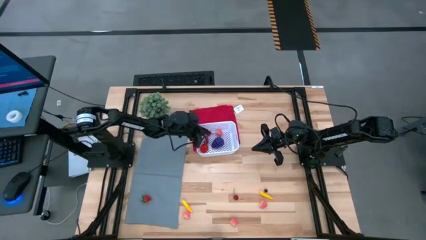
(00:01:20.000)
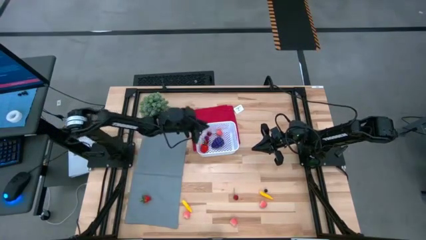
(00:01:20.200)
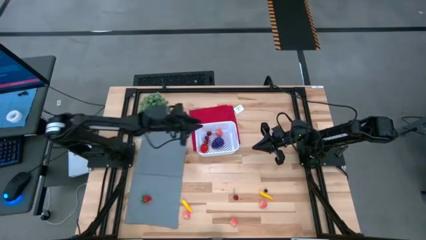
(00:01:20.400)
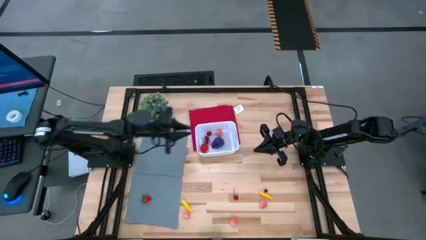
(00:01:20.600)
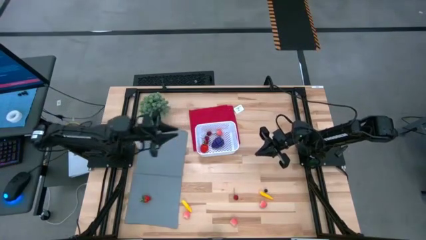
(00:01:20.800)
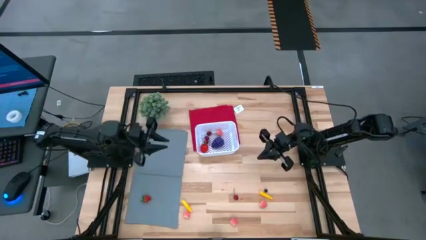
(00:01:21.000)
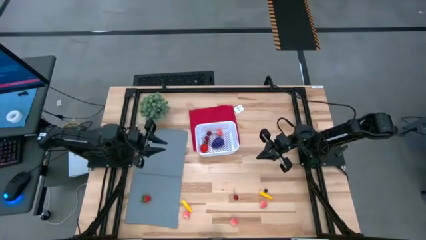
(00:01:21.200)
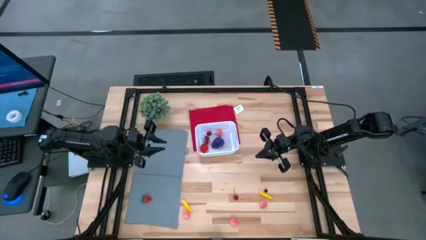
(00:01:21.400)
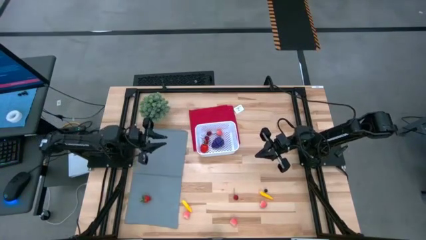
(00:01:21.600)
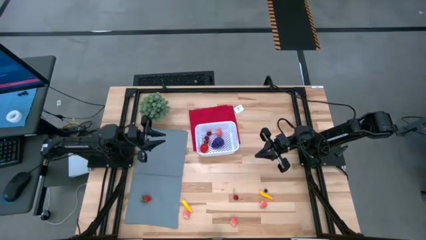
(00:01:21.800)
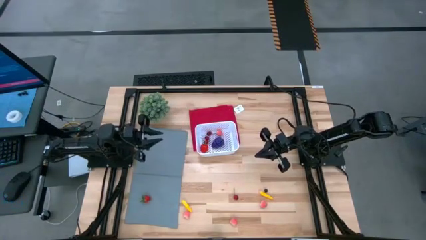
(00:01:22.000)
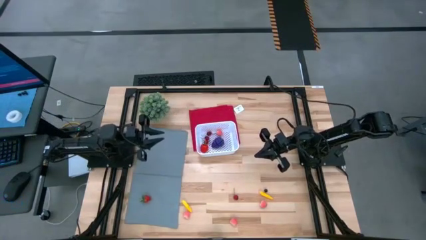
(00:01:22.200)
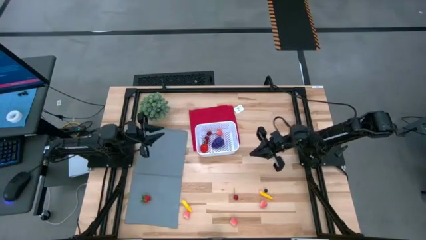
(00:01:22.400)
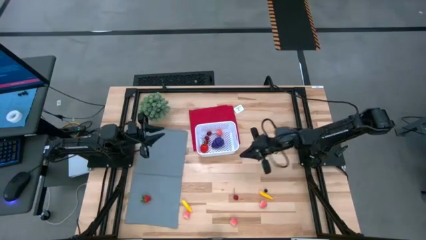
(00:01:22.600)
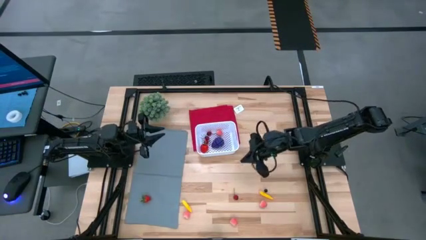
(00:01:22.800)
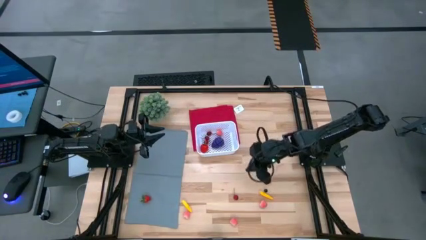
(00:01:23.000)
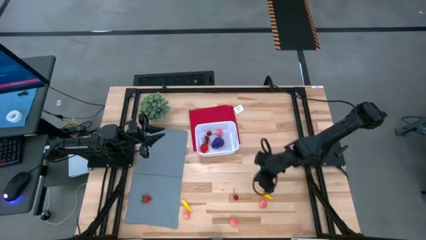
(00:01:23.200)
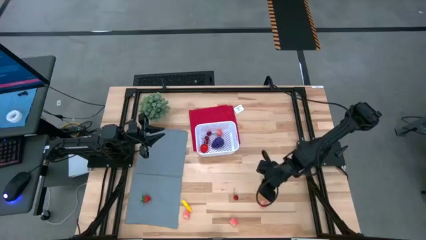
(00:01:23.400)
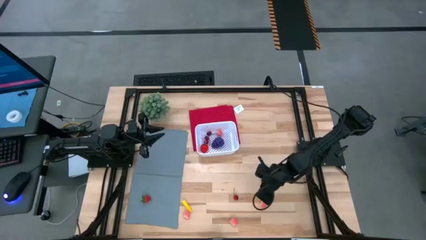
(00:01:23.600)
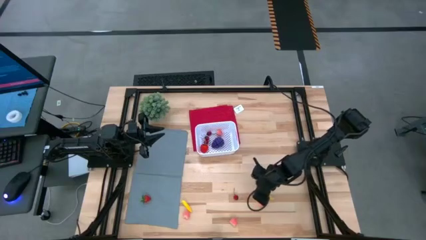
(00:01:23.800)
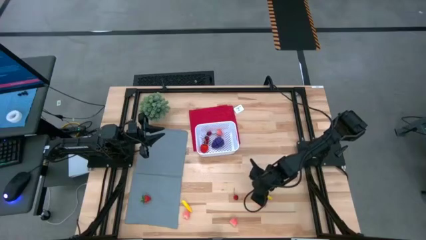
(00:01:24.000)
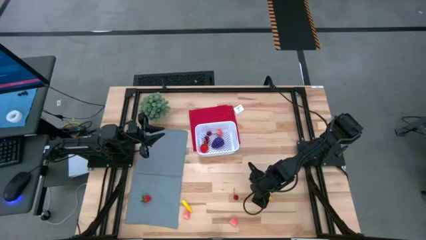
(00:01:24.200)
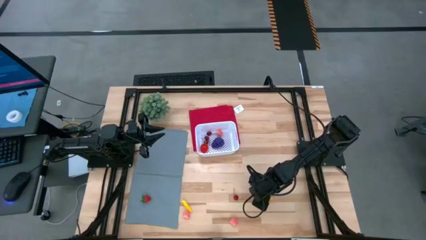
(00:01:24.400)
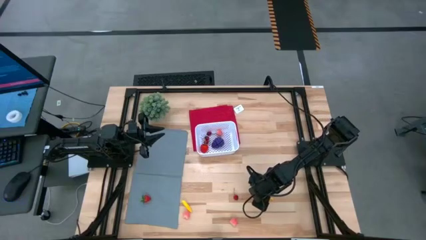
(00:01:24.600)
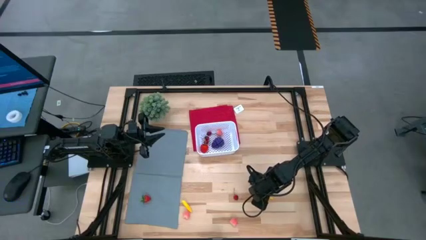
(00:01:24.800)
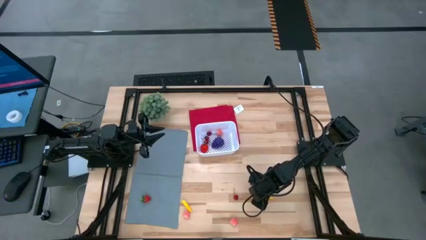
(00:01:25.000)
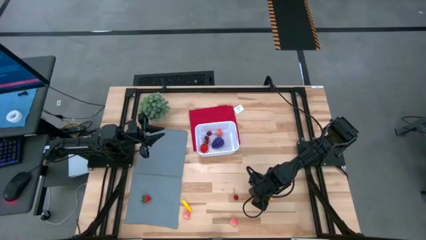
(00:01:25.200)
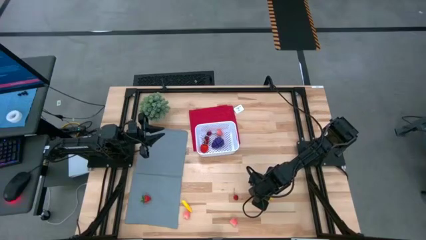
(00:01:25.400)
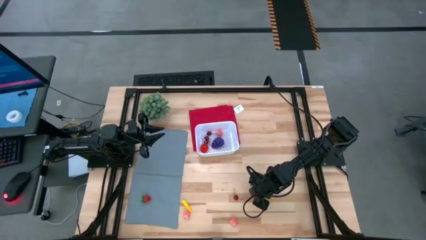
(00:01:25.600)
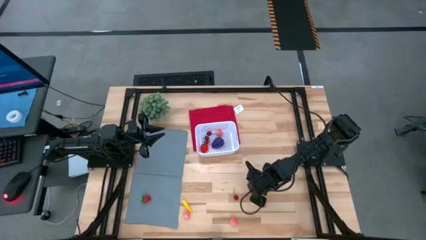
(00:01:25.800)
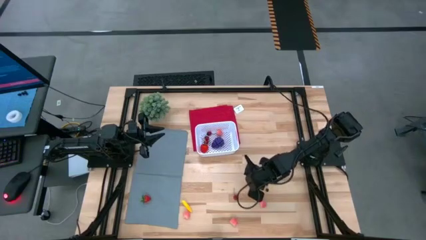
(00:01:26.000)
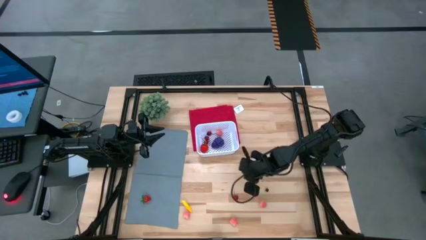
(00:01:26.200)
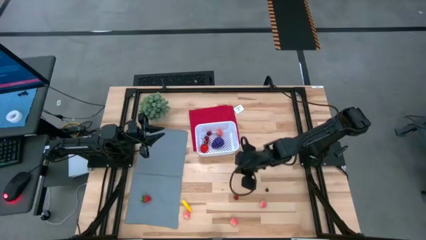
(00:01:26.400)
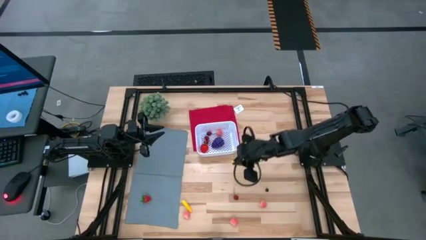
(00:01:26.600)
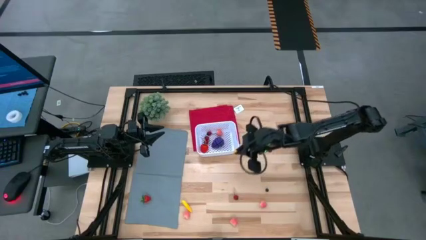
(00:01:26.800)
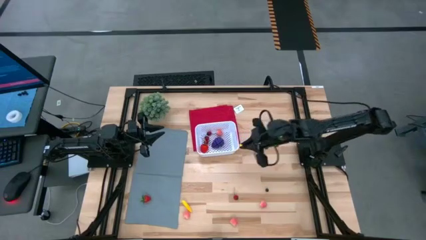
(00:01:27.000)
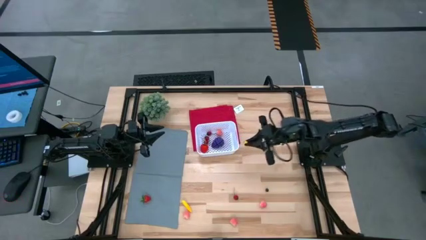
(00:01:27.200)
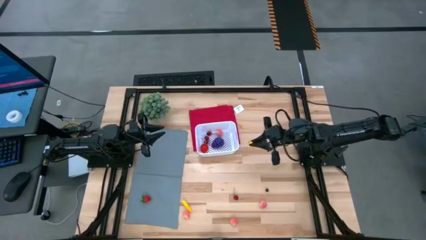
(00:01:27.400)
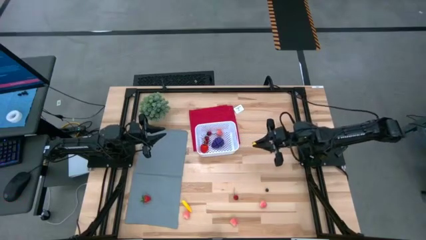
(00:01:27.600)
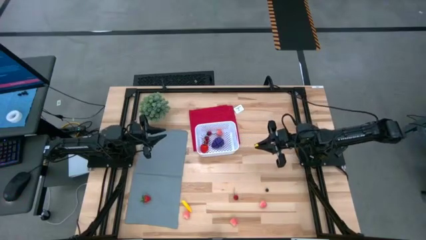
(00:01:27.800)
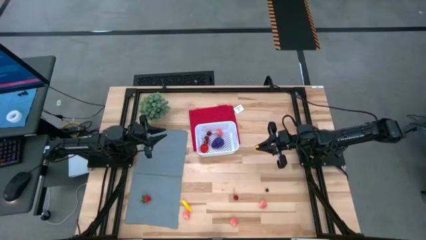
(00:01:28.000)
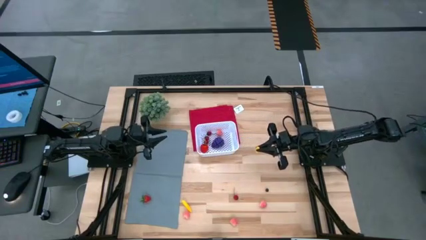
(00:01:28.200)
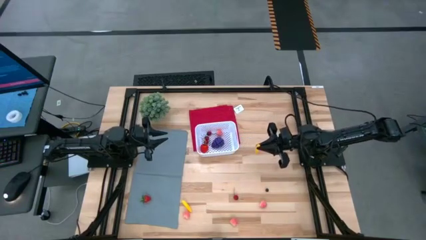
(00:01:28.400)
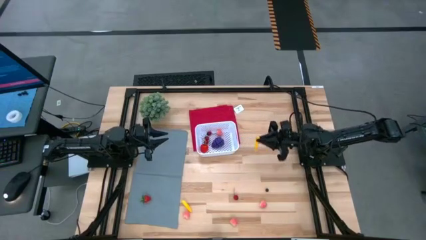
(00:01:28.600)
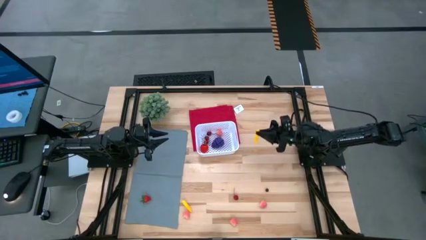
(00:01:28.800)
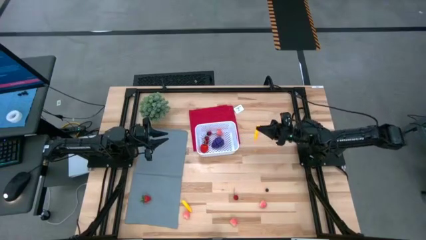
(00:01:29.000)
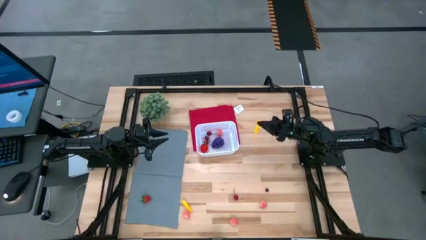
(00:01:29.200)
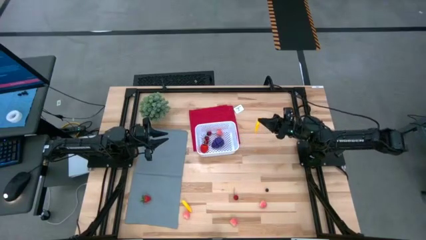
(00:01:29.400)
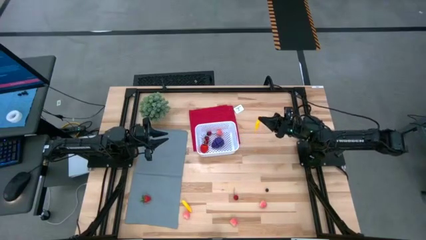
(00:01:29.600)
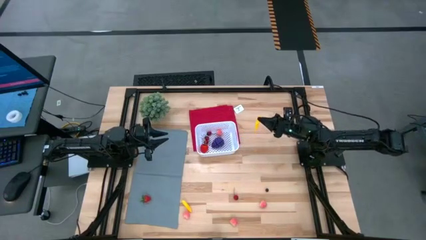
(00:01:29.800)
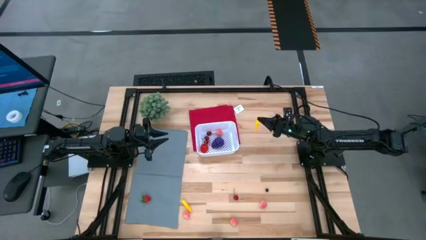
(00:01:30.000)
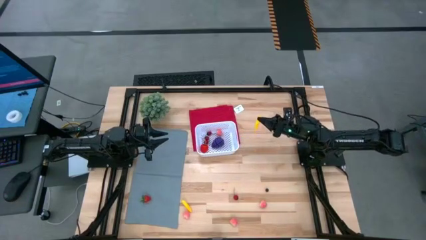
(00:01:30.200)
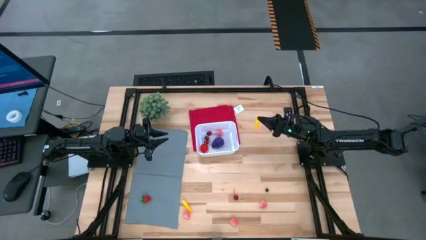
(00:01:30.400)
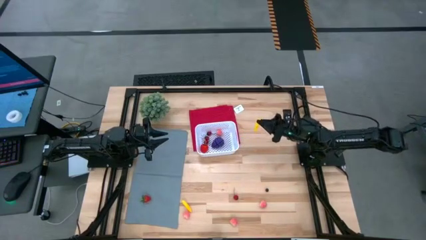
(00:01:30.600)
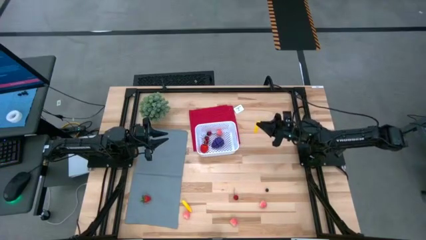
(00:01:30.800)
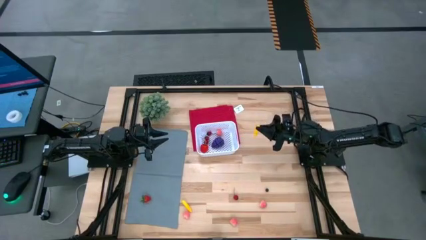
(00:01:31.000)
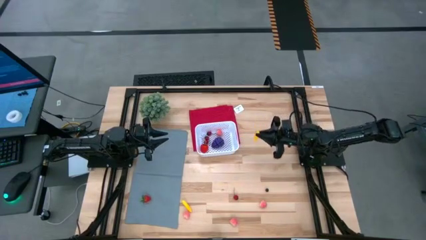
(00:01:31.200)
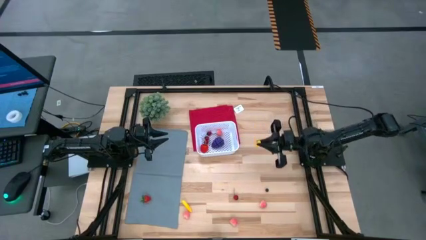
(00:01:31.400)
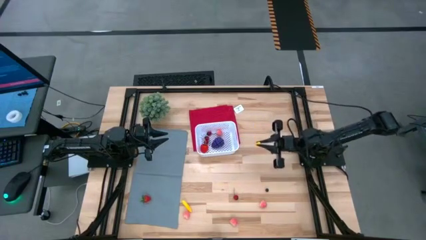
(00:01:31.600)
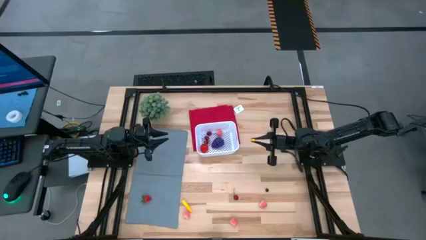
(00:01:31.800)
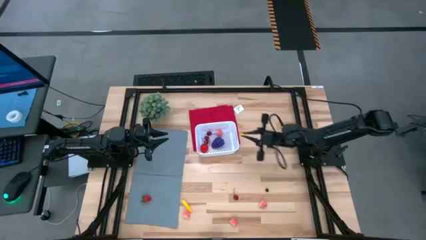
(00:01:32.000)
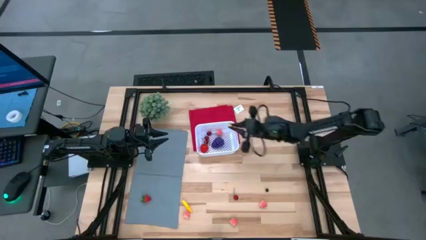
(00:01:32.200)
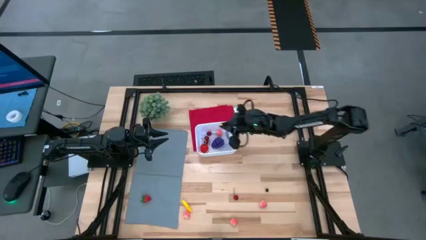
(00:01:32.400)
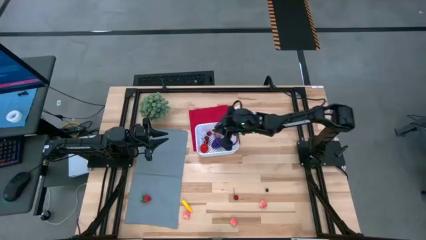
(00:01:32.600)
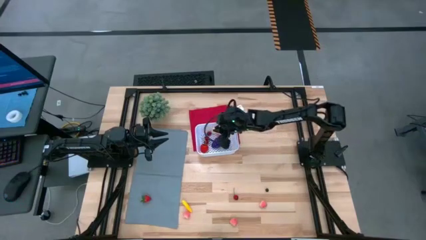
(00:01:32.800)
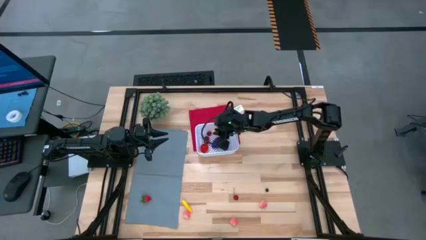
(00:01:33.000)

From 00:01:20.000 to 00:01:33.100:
Task: Pick and placing Produce into tupperware
Put the yellow corn into the white bin
